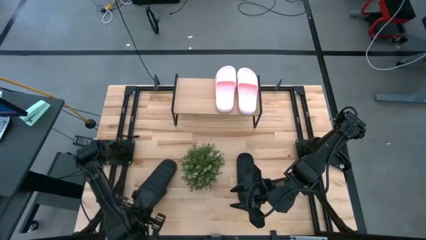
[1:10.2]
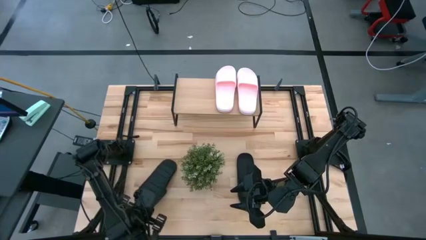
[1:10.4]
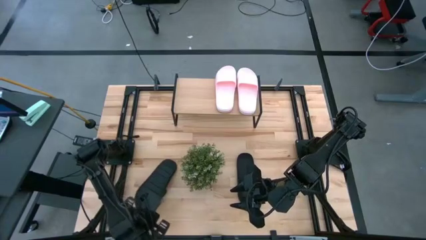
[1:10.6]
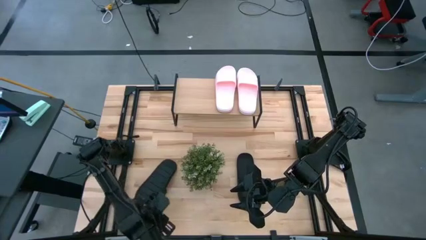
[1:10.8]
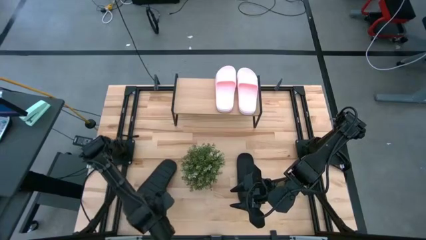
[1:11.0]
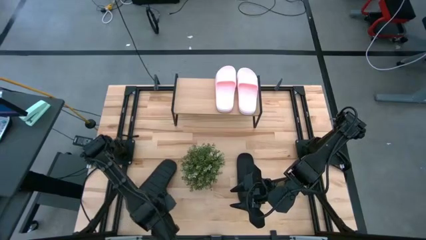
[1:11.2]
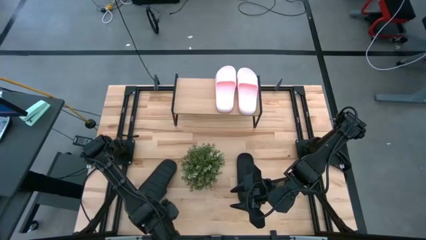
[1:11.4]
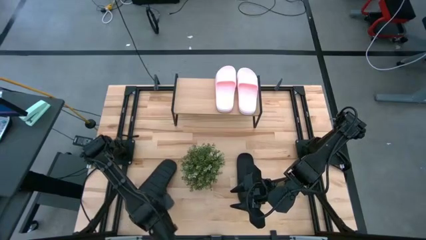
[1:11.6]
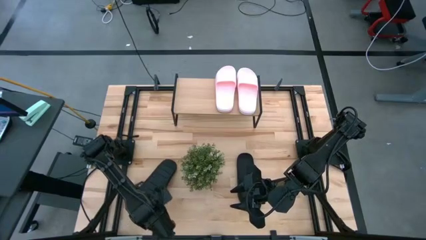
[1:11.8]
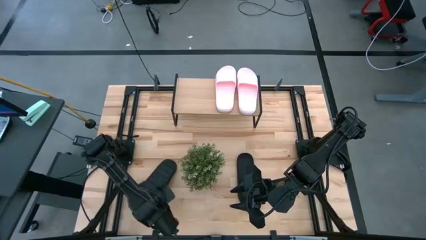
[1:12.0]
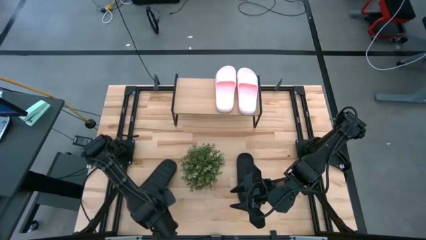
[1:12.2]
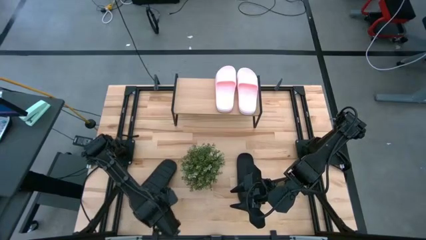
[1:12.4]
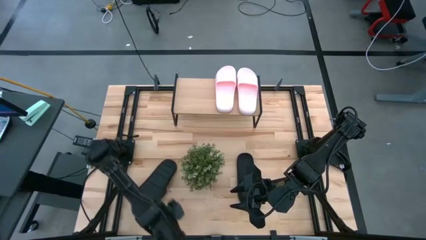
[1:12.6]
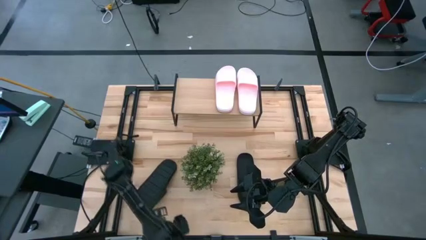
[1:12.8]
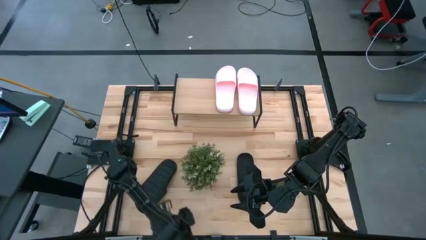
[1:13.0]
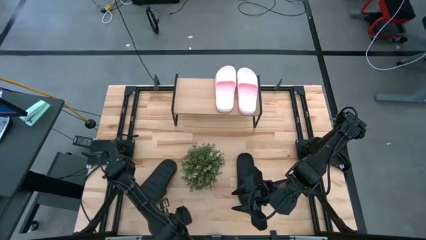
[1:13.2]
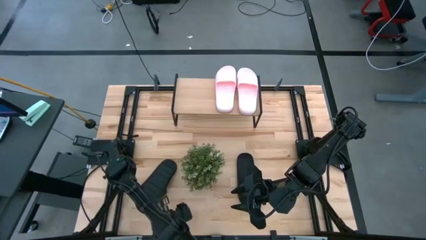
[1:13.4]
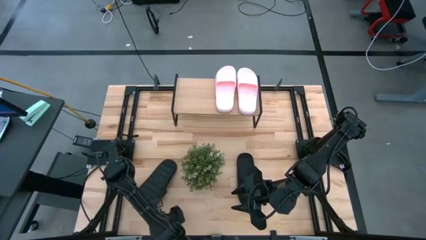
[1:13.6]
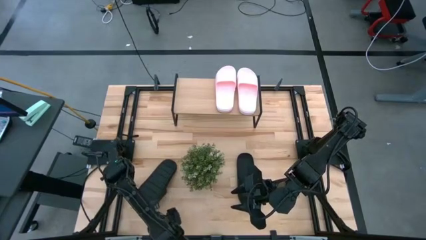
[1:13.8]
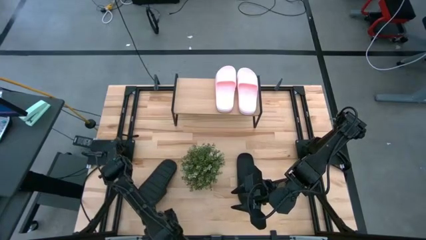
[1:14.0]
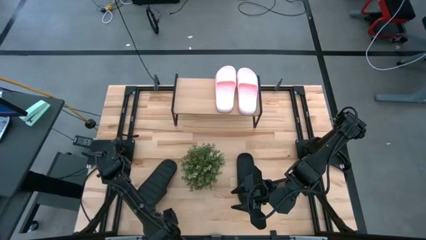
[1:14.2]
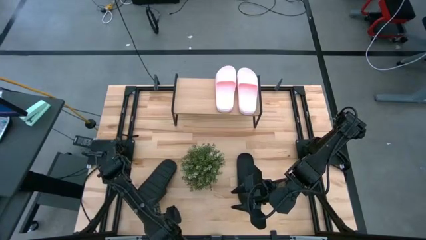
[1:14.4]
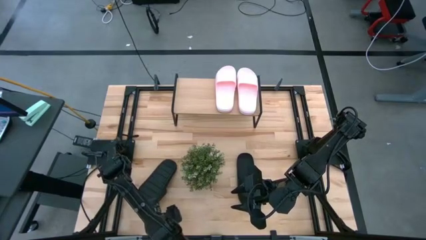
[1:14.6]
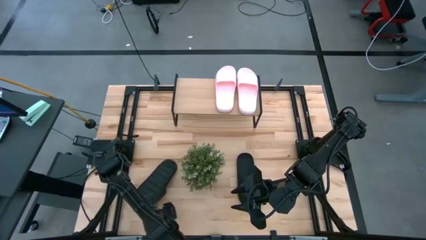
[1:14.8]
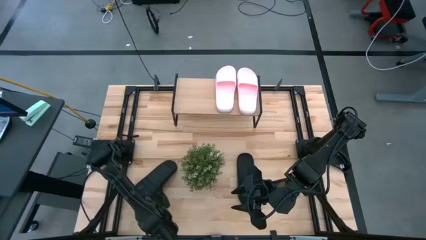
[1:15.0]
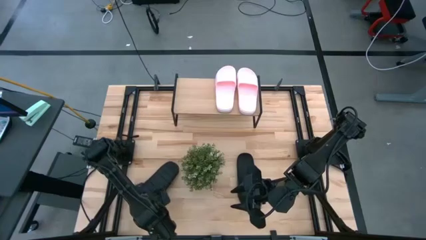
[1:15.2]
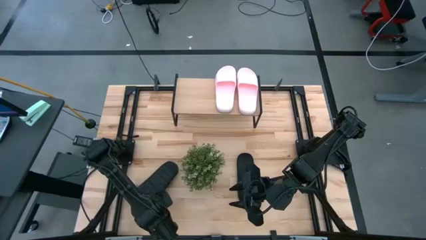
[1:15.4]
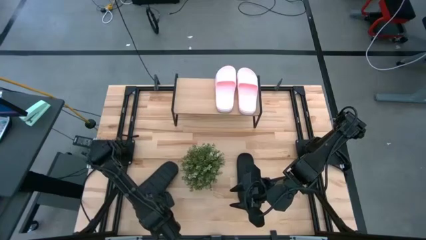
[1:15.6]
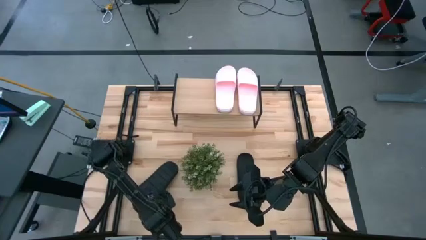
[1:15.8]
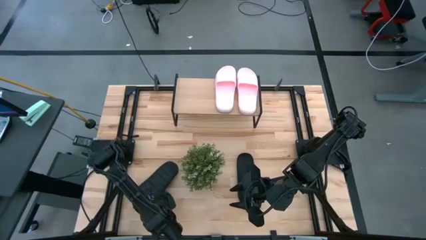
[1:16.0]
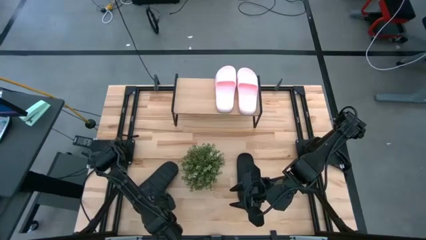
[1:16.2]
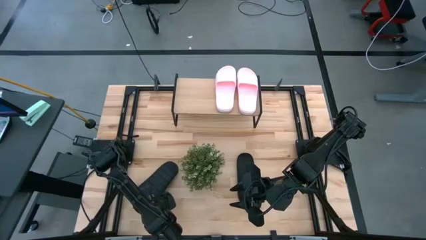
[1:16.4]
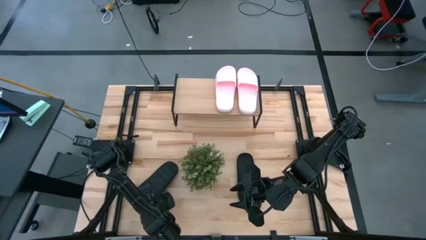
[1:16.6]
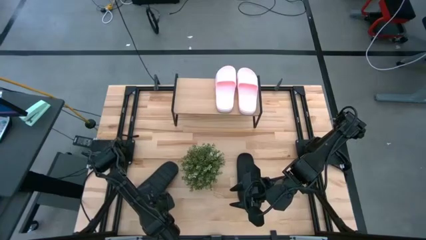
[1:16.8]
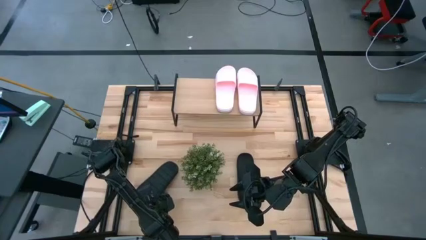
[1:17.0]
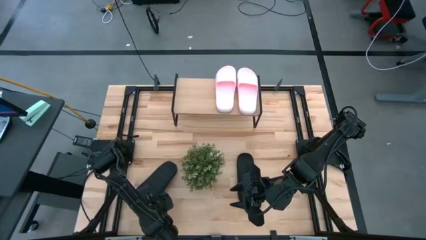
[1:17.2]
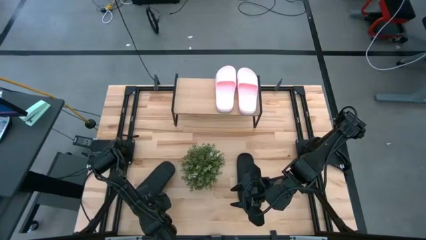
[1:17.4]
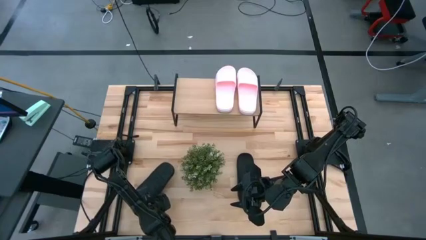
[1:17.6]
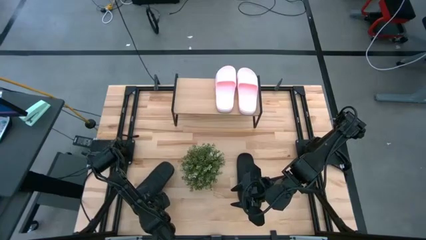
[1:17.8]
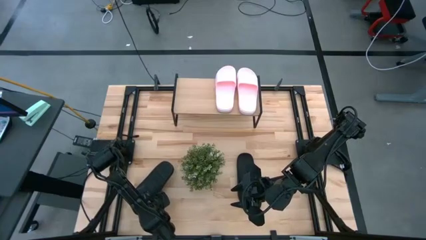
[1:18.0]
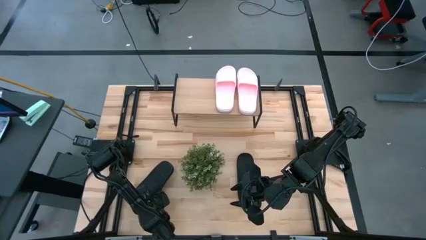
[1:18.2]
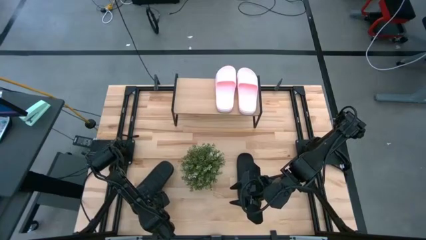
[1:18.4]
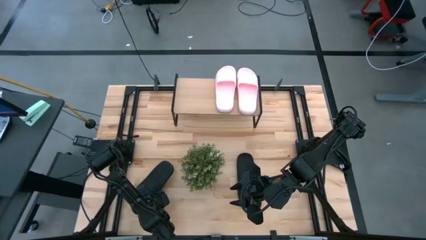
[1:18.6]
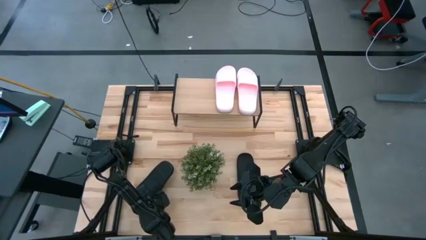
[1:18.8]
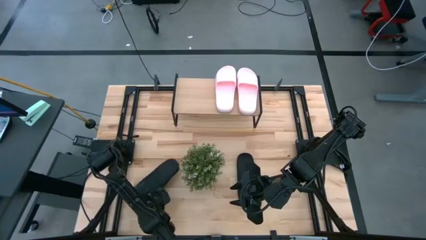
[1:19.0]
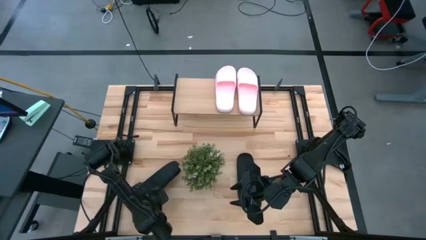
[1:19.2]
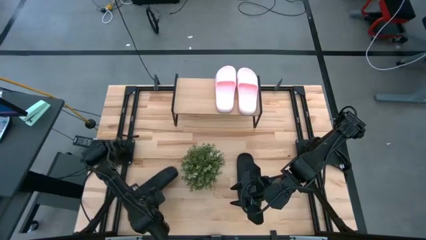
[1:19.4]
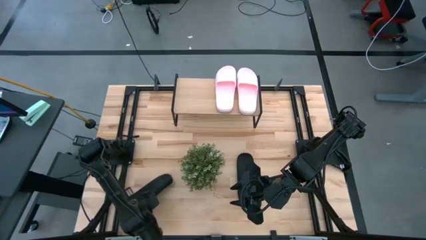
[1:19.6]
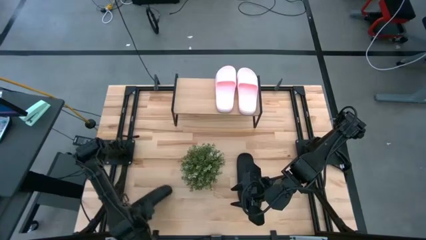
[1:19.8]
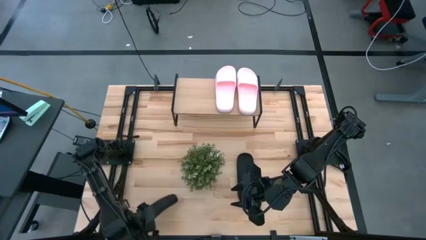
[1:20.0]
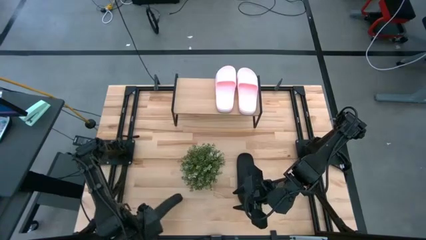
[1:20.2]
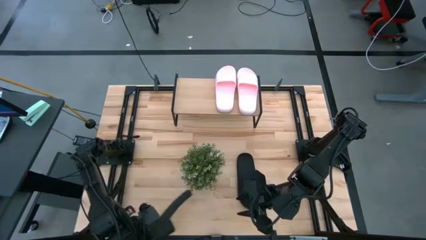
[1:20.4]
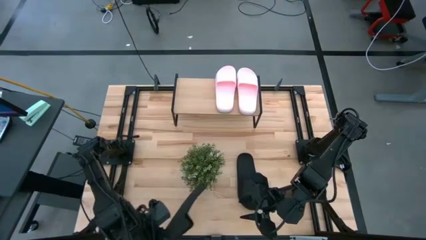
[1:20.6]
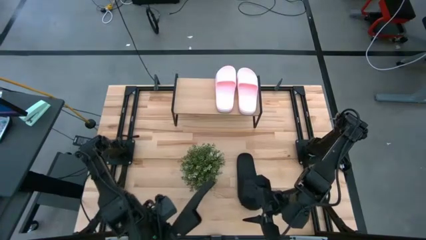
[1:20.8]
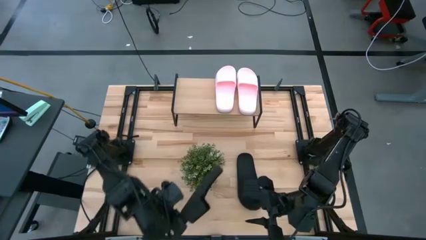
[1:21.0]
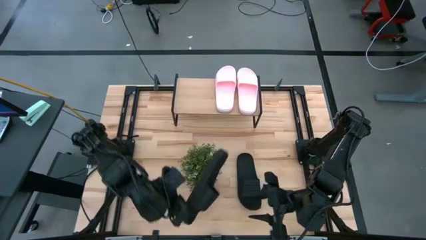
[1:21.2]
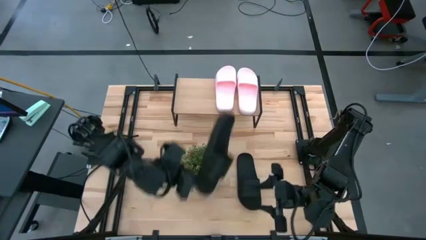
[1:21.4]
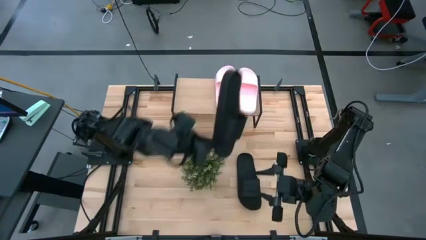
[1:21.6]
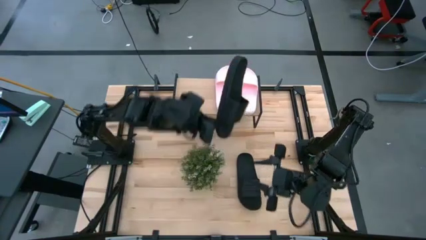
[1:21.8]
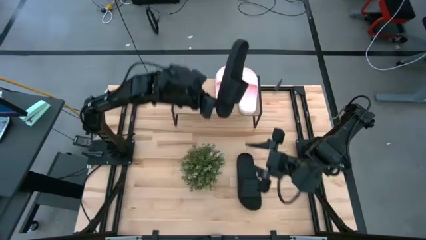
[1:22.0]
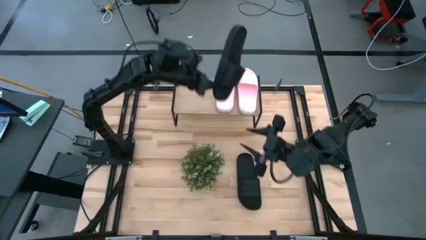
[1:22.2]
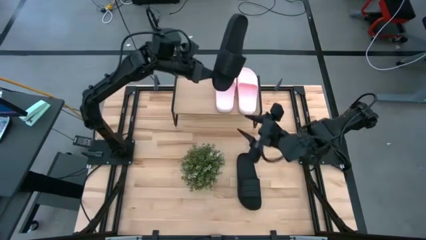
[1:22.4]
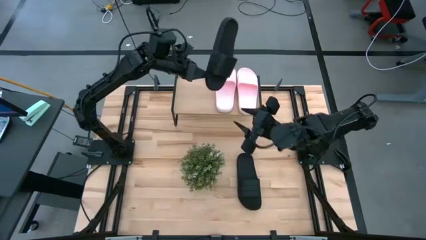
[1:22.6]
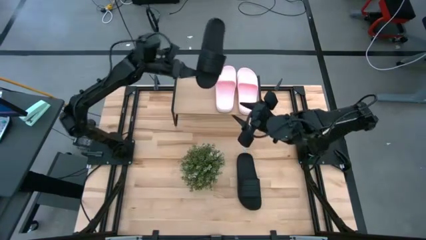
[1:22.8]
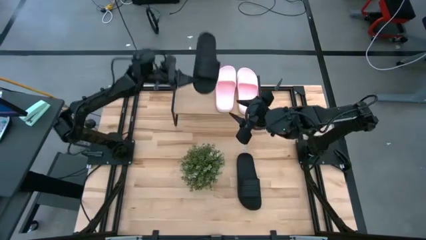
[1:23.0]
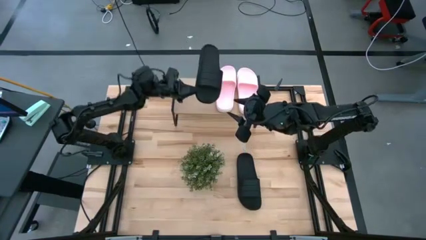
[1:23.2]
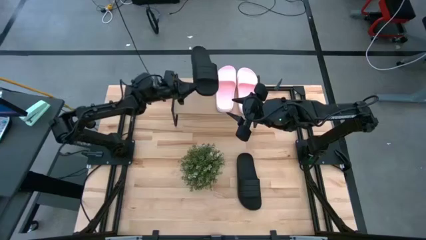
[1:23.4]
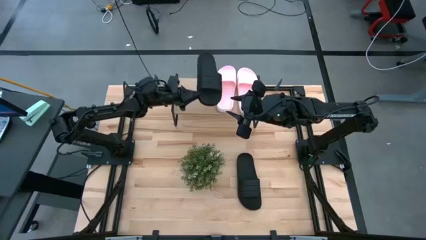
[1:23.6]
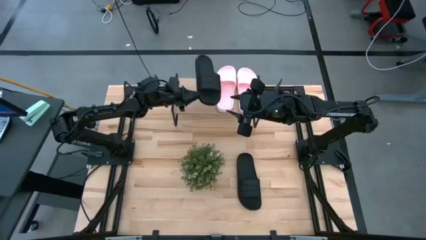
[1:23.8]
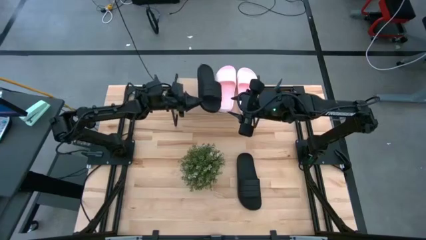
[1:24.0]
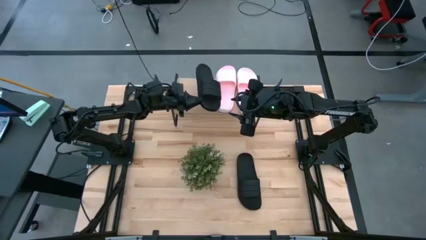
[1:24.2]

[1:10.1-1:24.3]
Task: Pick and place slides into the shelf
Put the left black slipper on the shelf

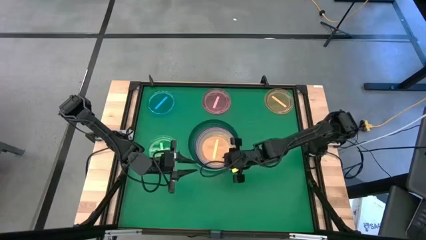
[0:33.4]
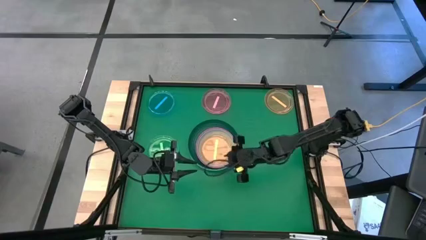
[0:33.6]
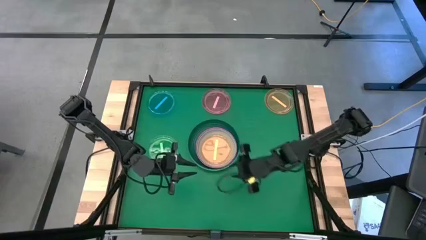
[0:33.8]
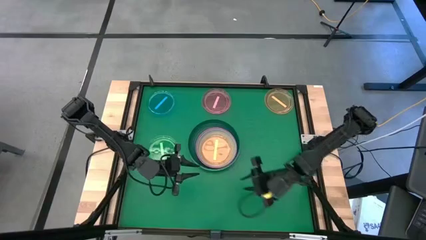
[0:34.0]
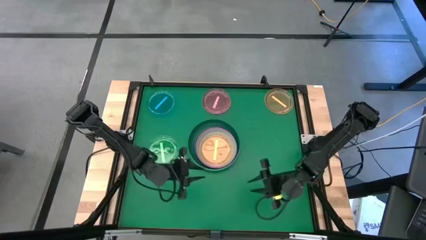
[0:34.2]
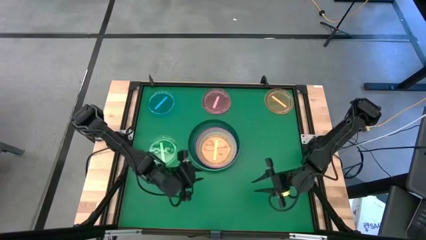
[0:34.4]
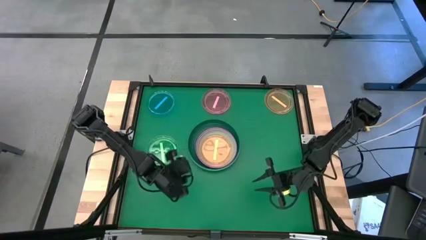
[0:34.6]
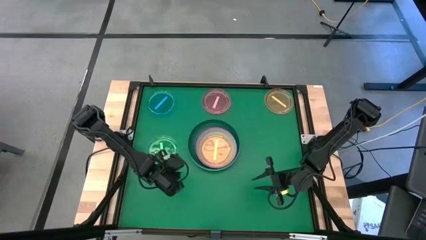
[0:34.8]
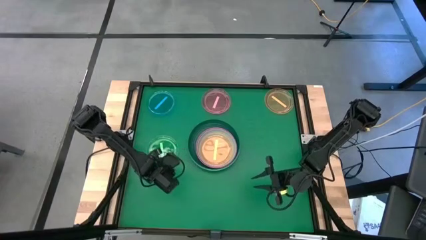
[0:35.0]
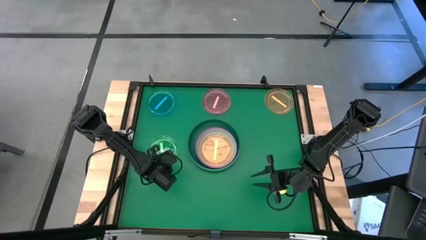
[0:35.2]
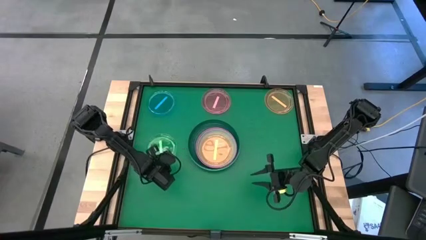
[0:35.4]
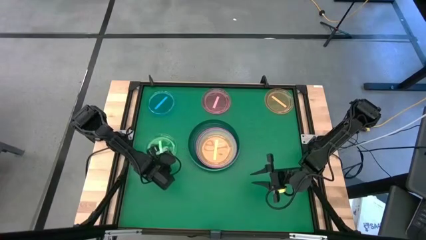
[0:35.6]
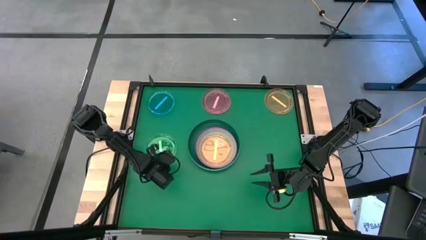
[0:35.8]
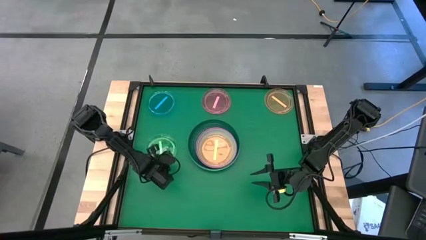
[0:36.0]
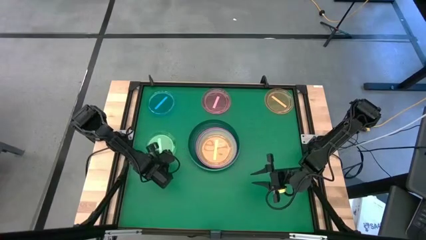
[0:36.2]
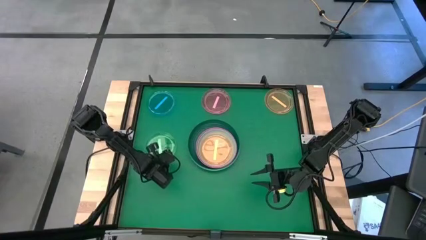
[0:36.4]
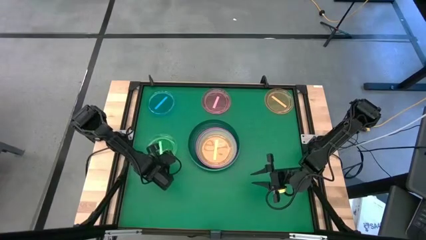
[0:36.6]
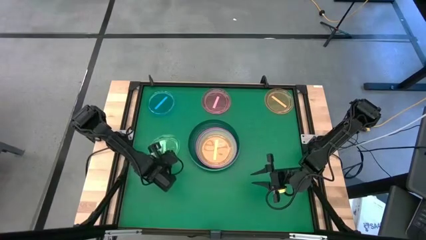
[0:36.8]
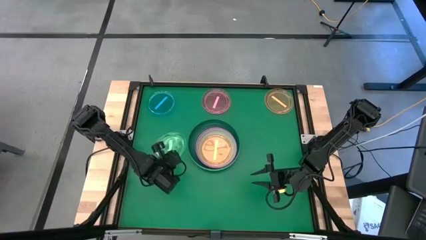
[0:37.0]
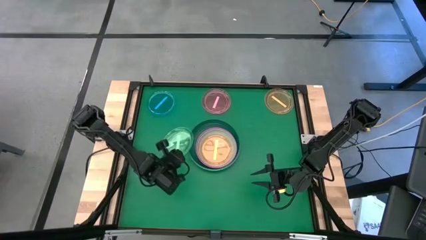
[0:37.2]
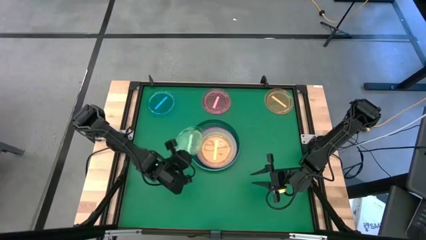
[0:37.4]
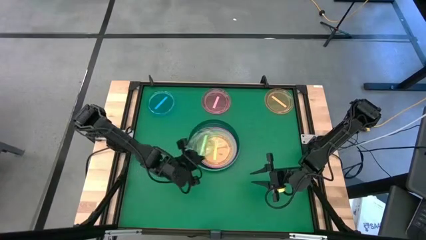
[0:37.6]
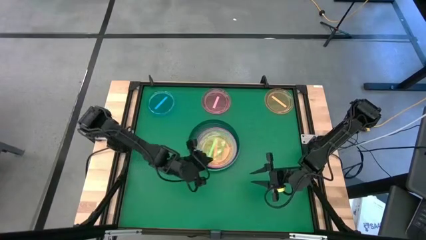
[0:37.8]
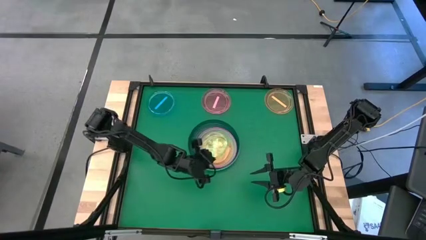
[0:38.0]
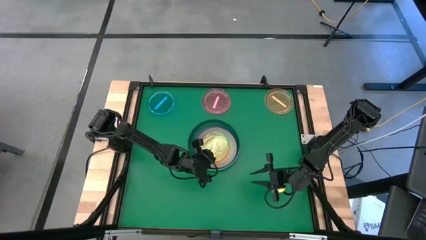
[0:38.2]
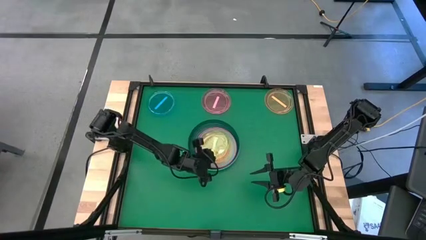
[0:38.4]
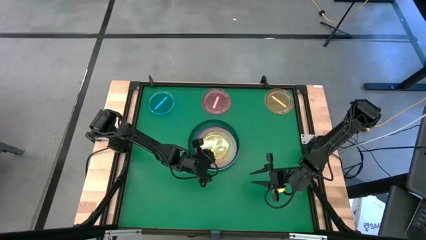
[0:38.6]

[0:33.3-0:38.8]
Task: Stack plastic plates
Stack the green plate on top of the orange plate
